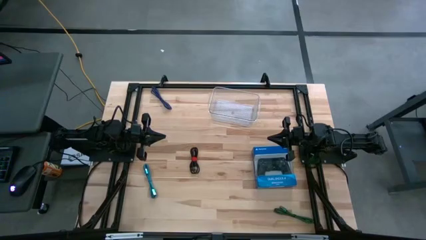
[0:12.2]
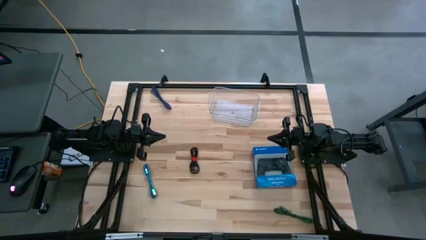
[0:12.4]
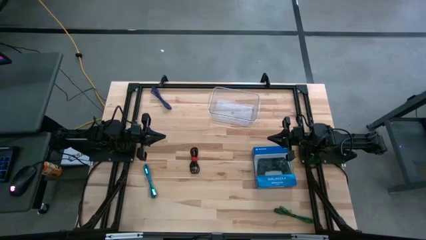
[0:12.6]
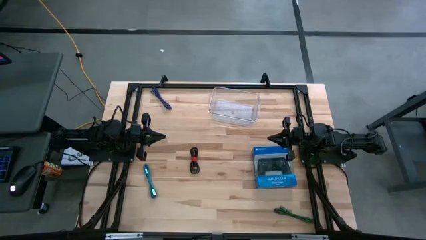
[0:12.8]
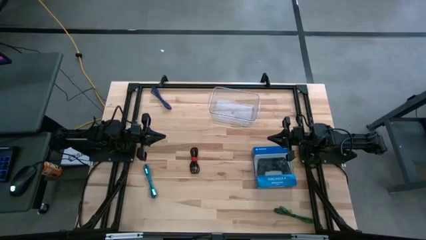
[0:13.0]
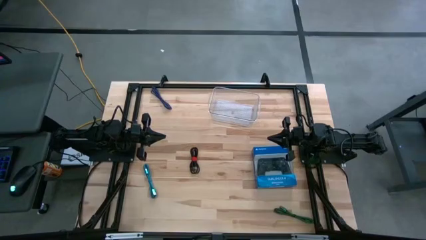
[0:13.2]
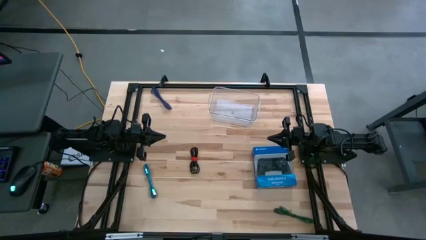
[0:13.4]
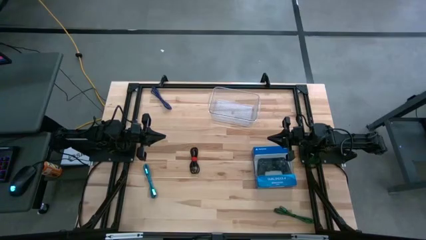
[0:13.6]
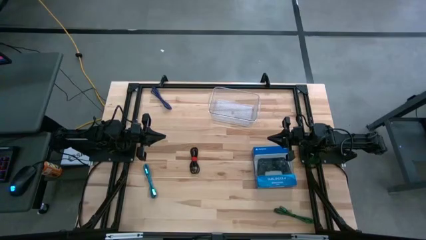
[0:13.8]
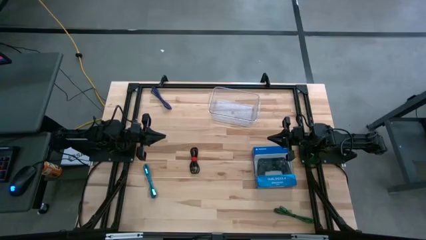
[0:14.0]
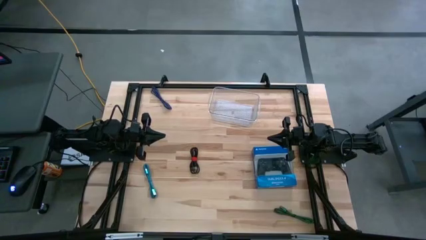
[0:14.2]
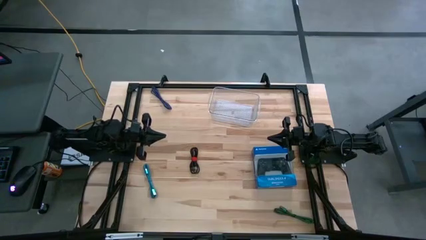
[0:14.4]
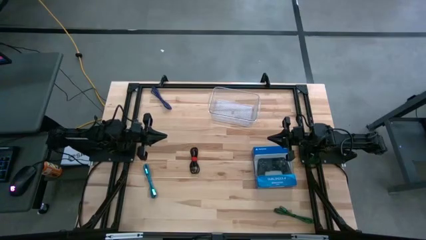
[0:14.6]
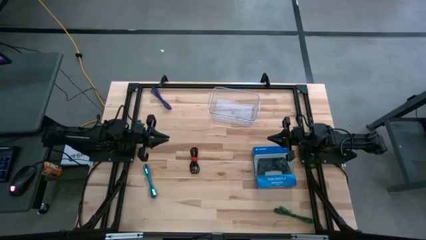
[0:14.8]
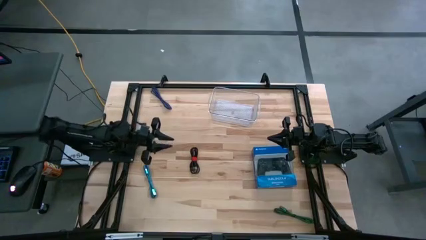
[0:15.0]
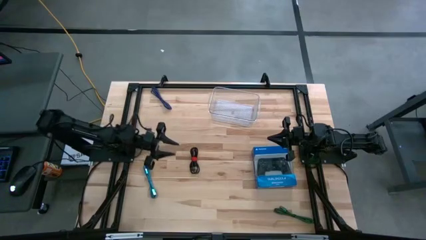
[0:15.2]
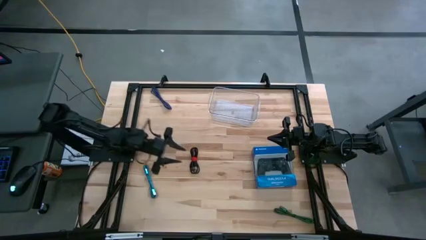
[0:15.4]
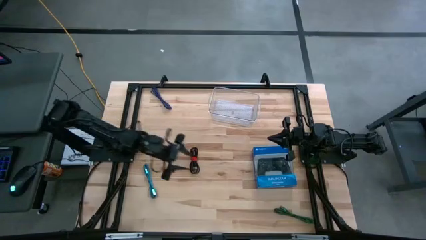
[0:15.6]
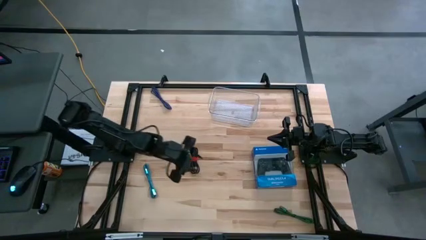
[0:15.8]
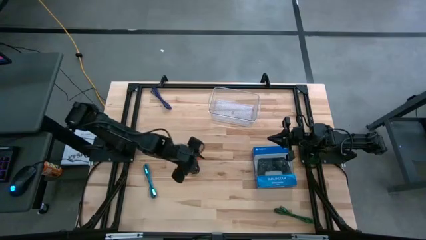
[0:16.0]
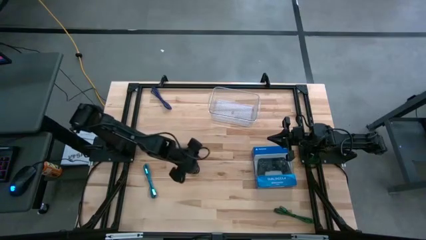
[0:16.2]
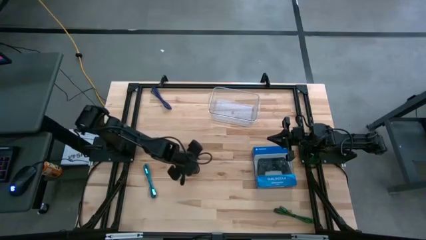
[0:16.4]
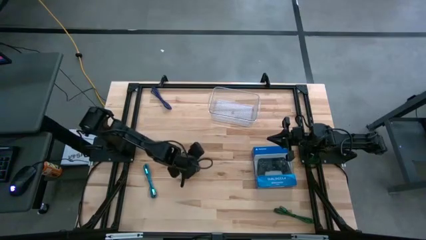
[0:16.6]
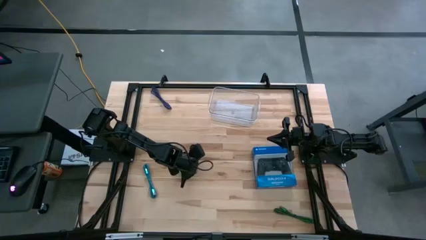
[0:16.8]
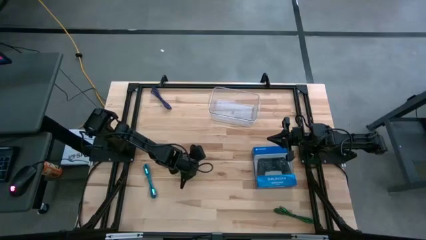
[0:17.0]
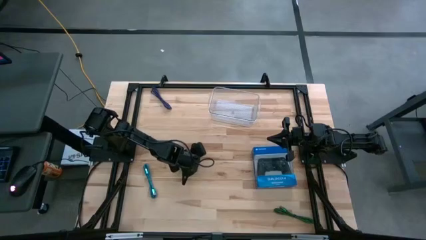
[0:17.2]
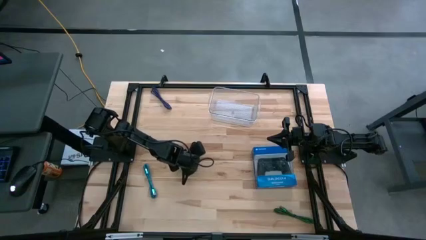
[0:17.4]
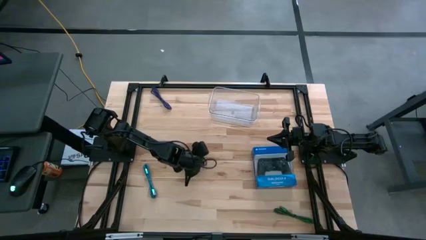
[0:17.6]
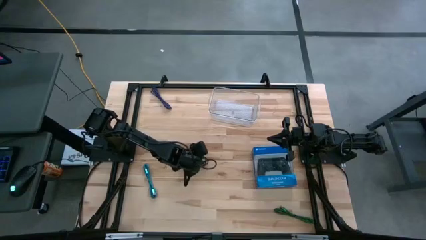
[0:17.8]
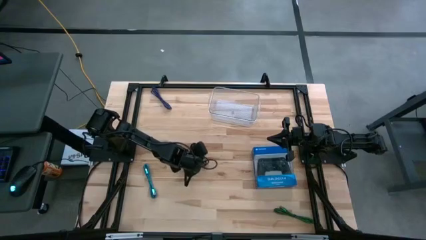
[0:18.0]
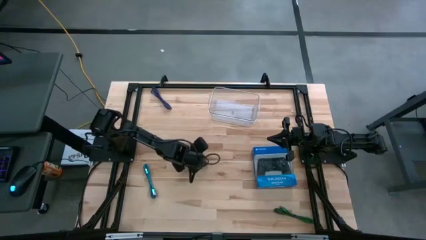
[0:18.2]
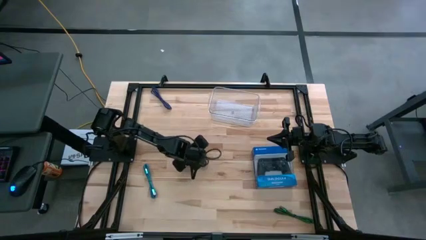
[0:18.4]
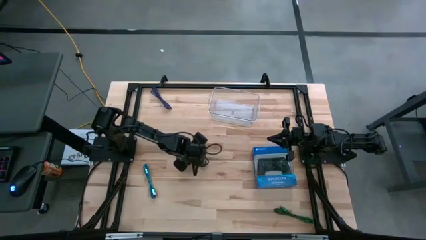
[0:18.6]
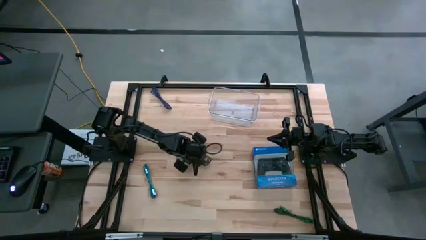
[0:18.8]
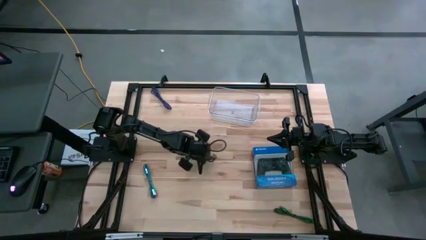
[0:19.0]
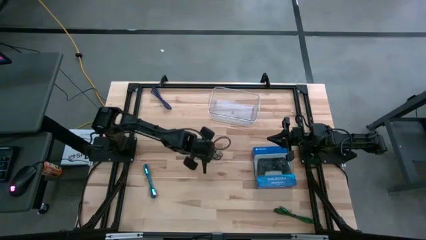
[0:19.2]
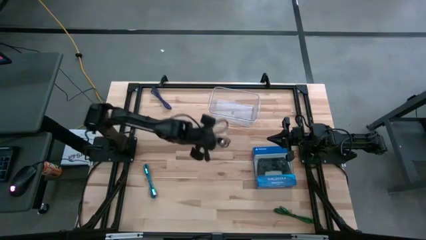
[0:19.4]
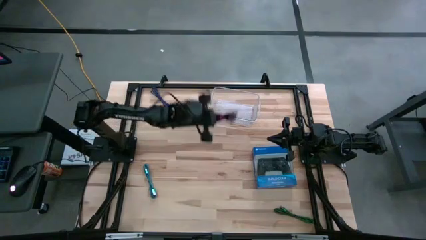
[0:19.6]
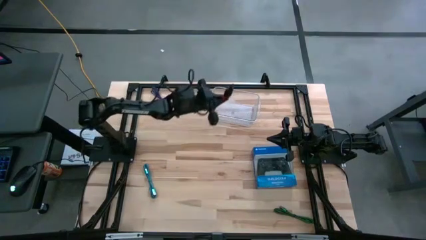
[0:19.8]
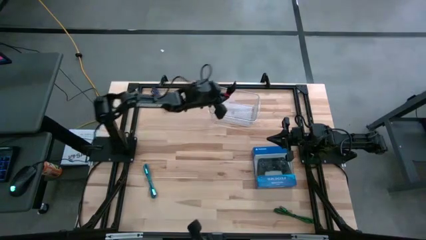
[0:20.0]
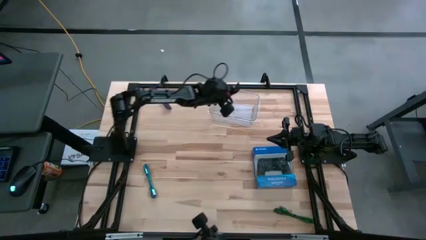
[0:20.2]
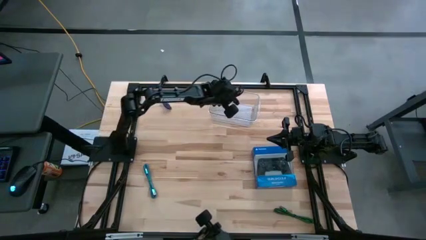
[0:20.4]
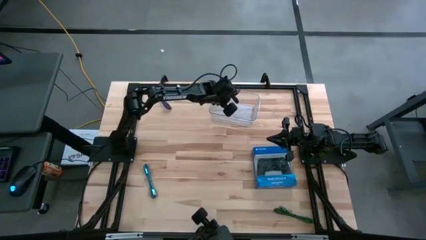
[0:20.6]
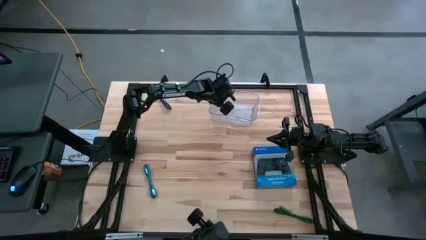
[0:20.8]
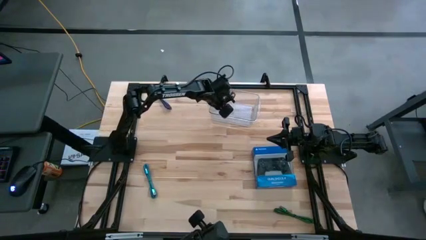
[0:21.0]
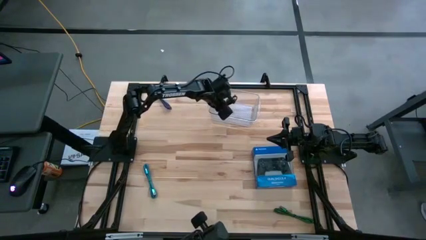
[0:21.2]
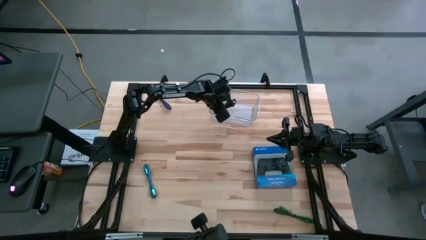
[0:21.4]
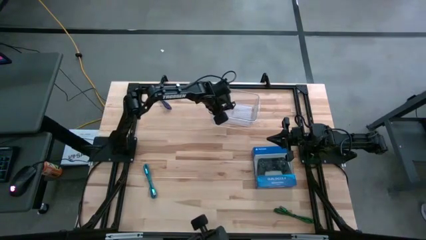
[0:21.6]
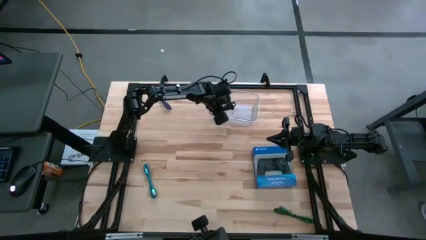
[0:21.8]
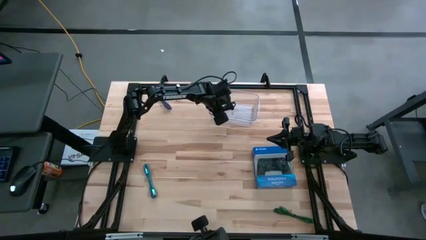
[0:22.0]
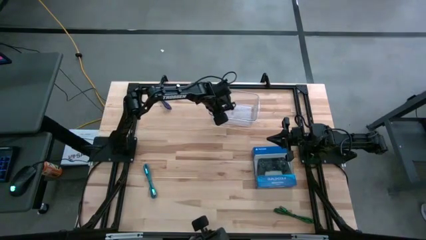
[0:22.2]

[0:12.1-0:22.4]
Task: Pick and place USB-C Cables
Put the black charger cable into the bin

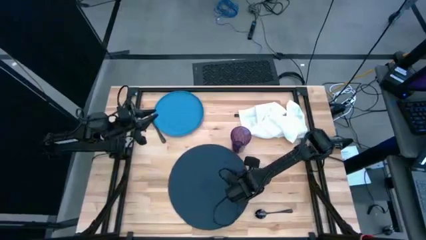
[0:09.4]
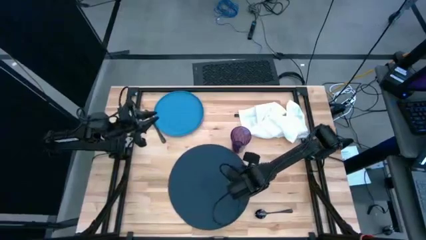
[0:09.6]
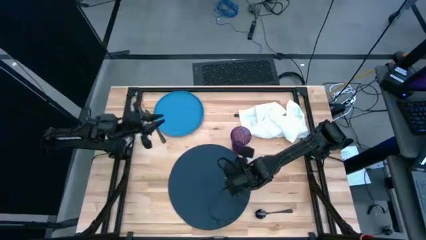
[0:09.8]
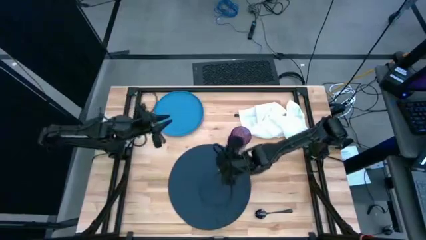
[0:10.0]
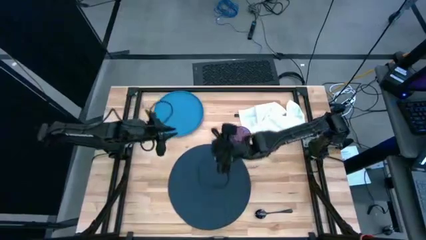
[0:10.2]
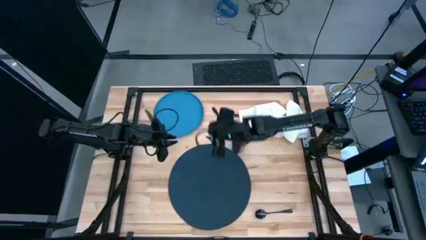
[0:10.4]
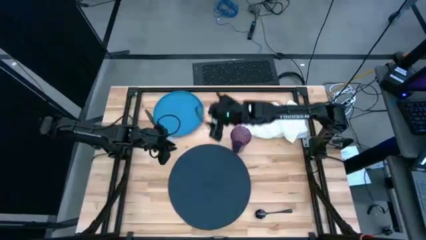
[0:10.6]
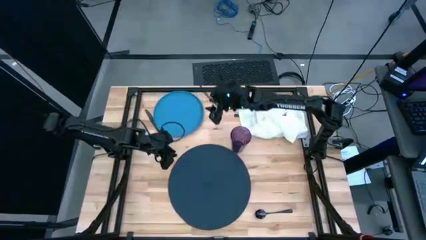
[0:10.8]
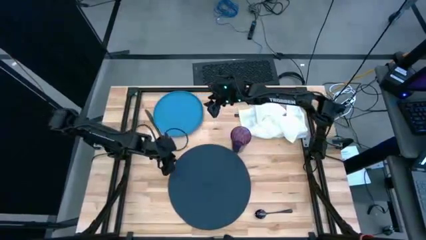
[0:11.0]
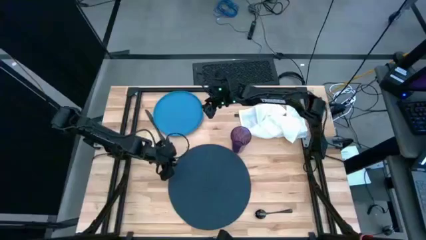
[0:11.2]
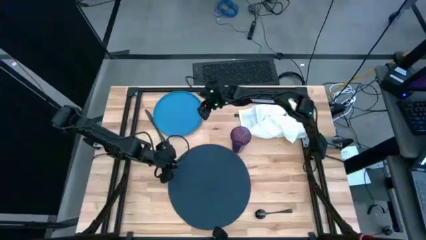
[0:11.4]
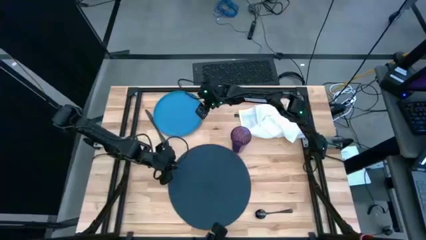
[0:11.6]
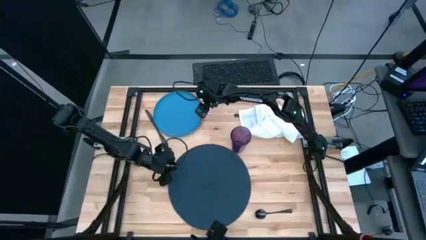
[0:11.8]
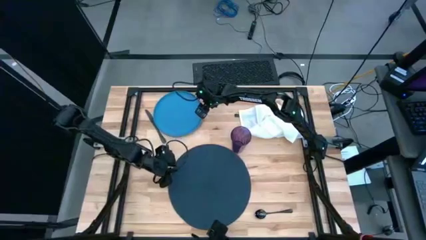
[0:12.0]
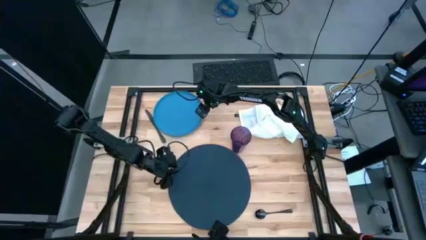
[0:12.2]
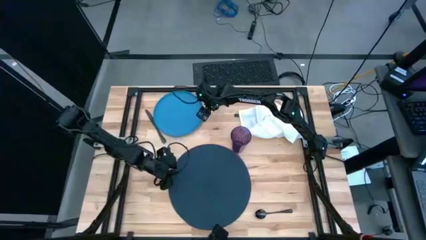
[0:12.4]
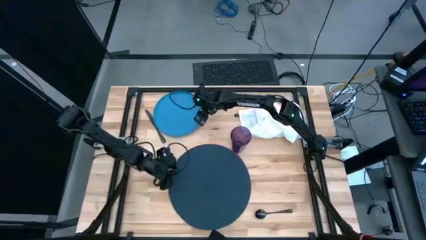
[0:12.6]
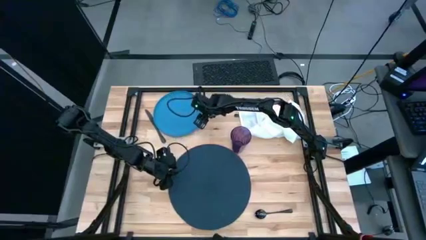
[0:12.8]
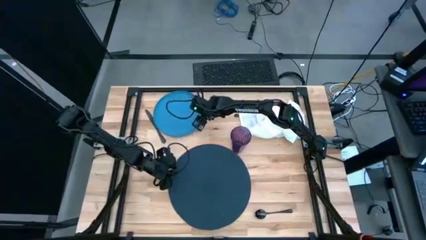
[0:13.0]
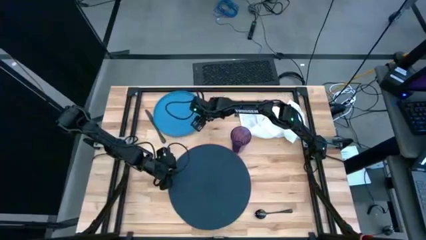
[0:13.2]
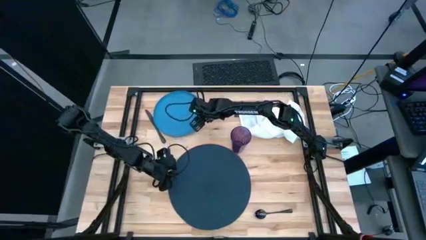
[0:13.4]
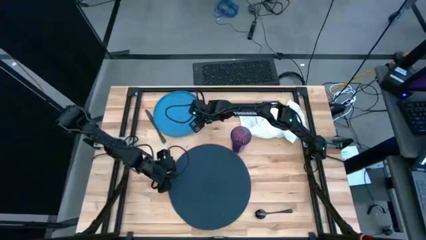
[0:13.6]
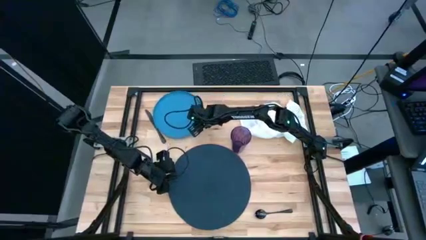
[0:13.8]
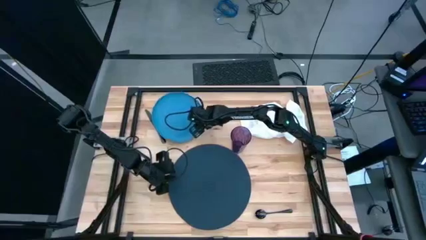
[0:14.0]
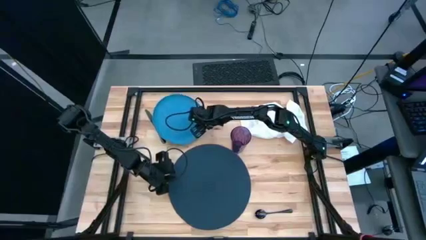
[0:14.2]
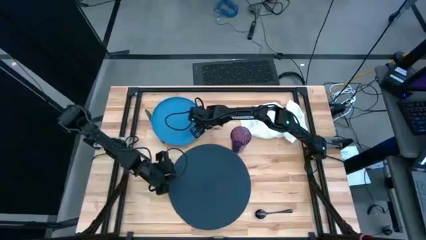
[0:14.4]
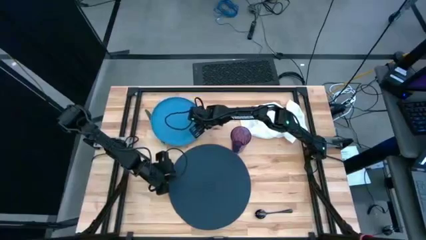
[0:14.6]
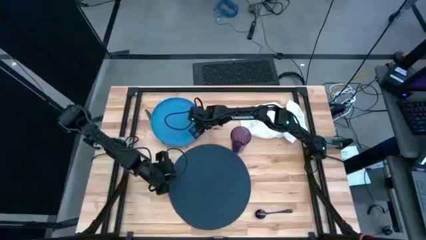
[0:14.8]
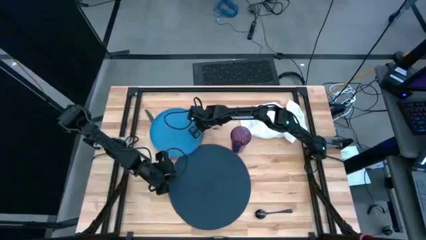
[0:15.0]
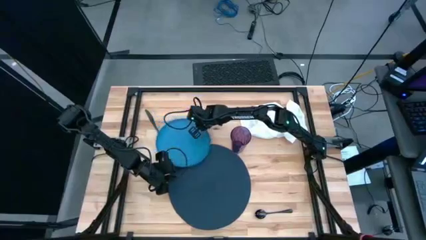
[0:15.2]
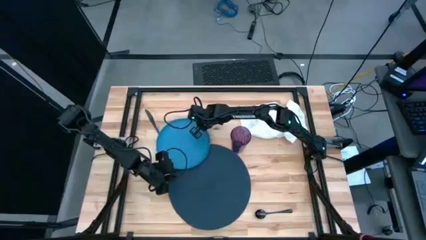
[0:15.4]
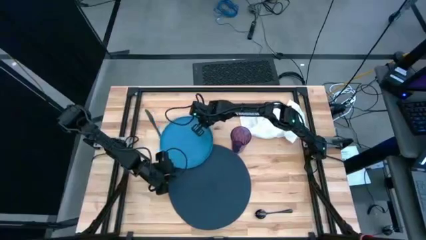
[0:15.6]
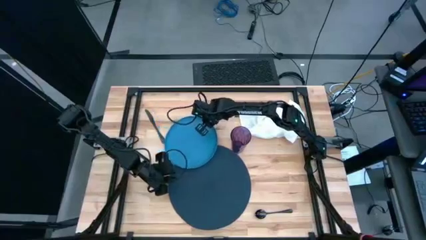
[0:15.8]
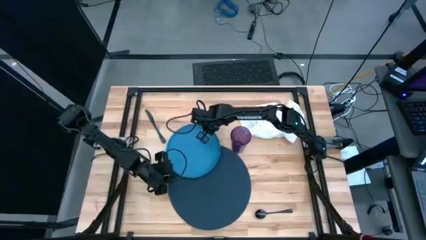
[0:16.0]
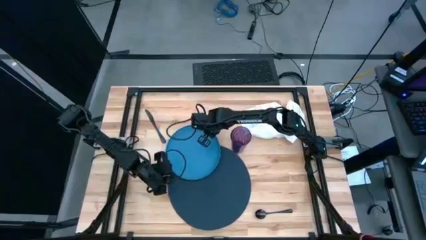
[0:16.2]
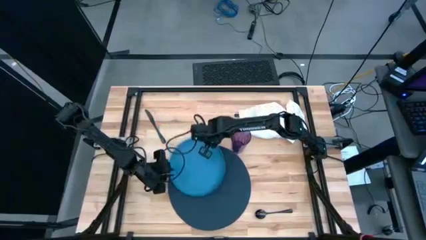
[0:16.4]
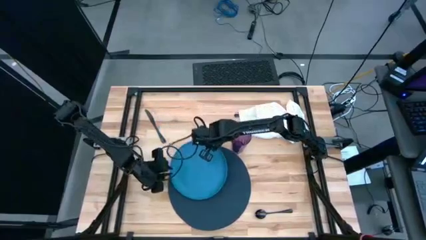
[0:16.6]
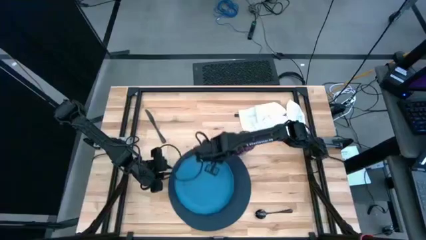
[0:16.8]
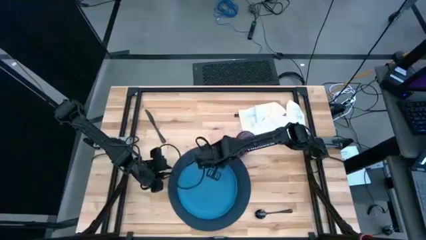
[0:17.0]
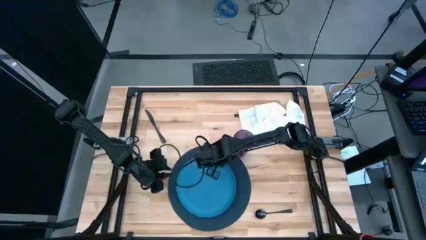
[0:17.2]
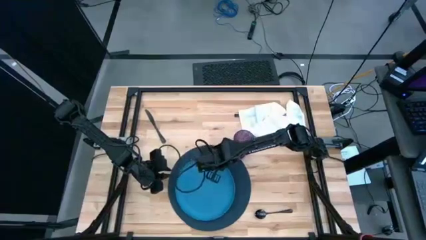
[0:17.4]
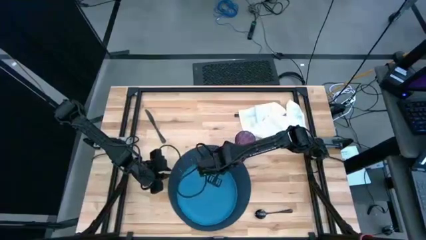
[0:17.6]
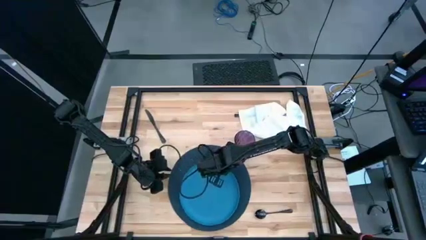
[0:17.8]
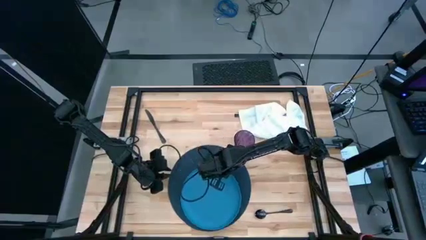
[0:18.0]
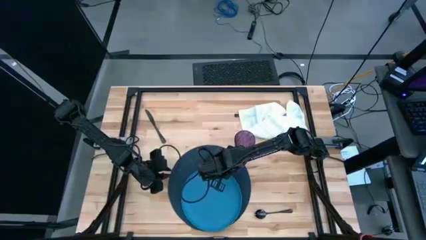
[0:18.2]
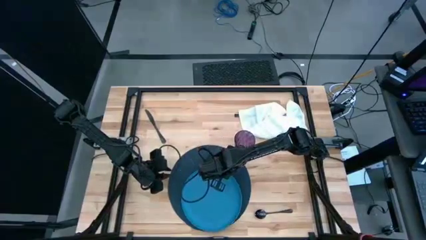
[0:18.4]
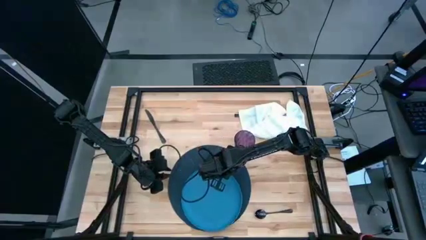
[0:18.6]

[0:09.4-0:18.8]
Task: Set table place
Put the blue plate on the dark blue placemat
